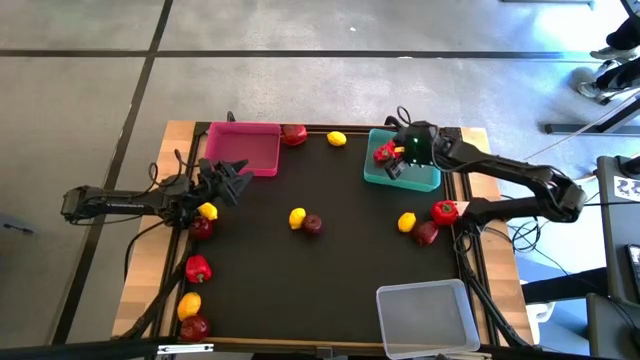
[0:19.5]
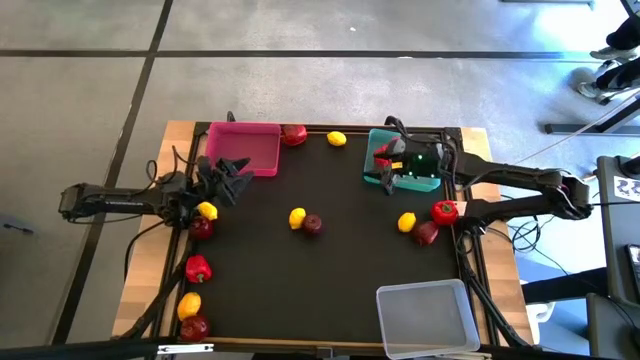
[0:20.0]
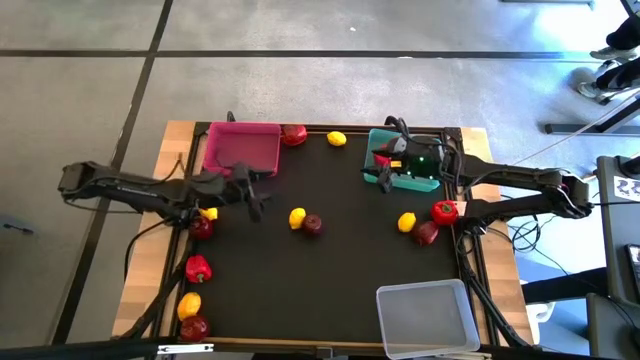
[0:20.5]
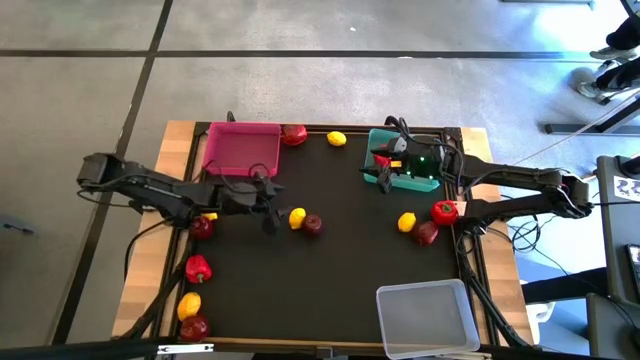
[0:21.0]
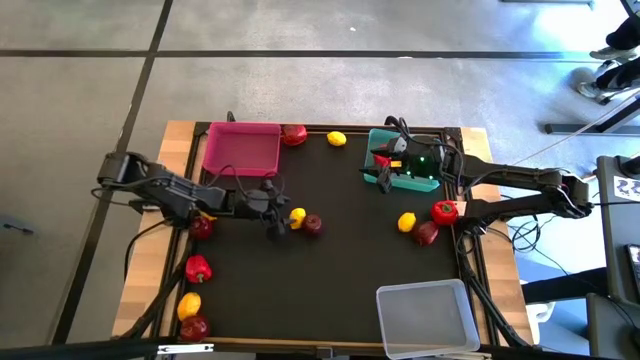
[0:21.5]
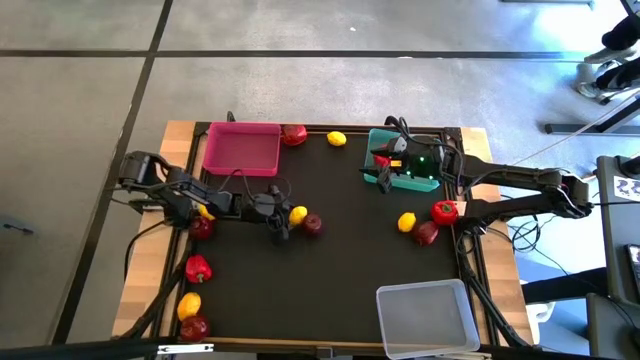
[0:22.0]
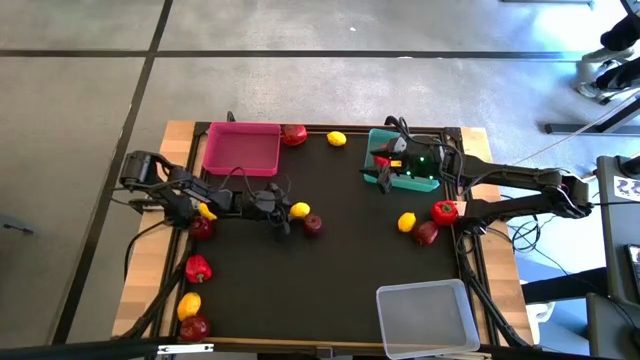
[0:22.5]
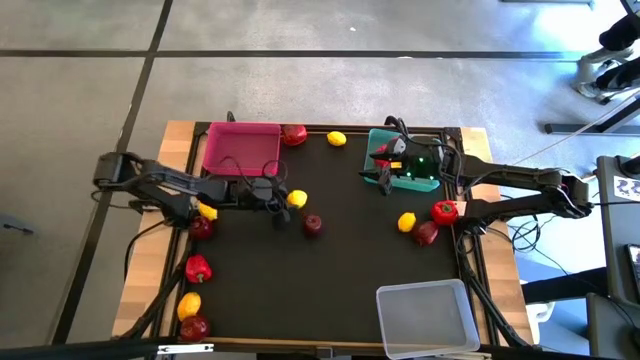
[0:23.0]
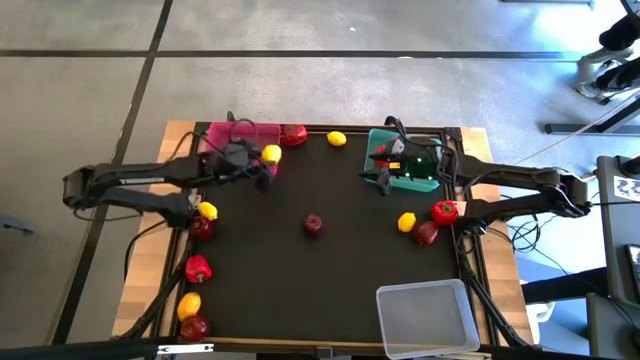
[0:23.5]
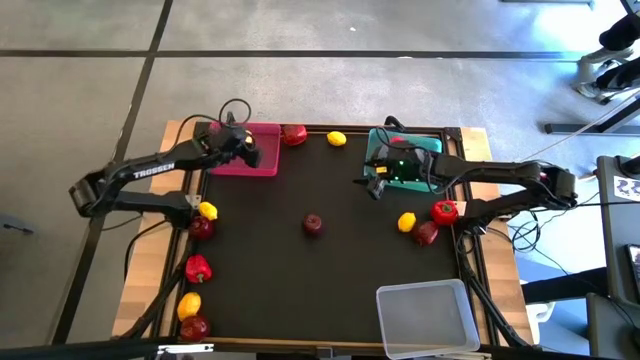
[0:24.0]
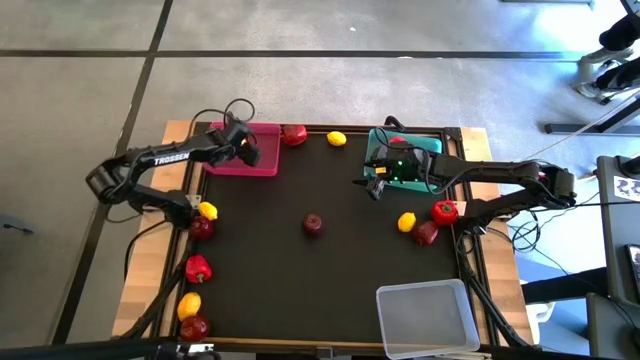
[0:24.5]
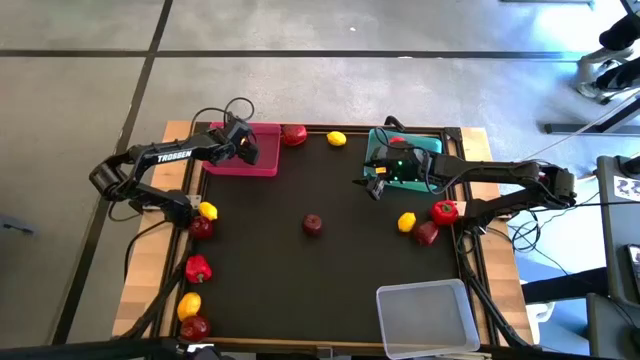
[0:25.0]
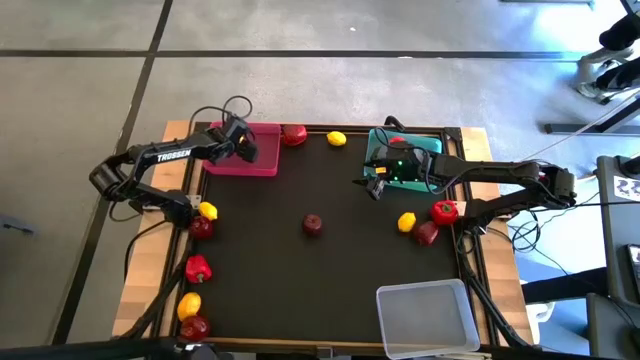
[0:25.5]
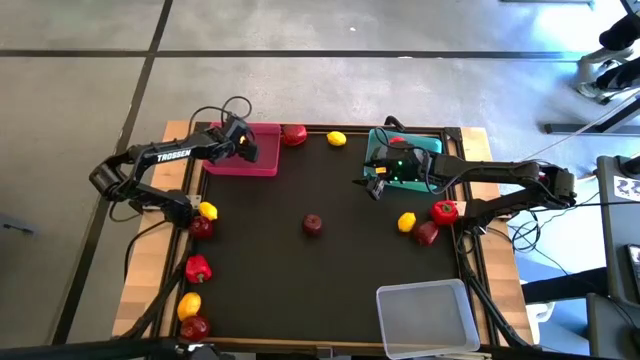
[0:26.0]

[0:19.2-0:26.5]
Task: Sort produce into baskets
Put the lemon into the pink bin

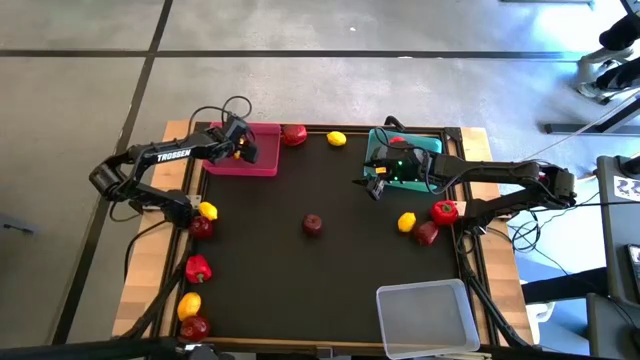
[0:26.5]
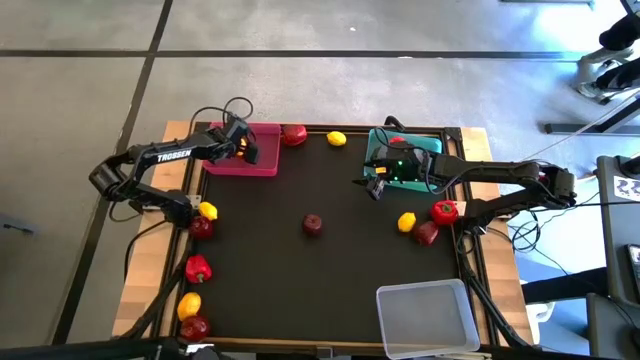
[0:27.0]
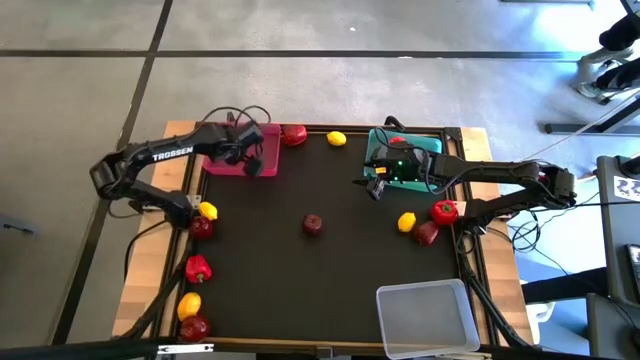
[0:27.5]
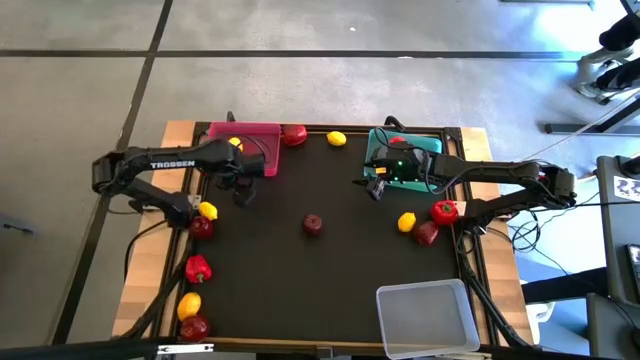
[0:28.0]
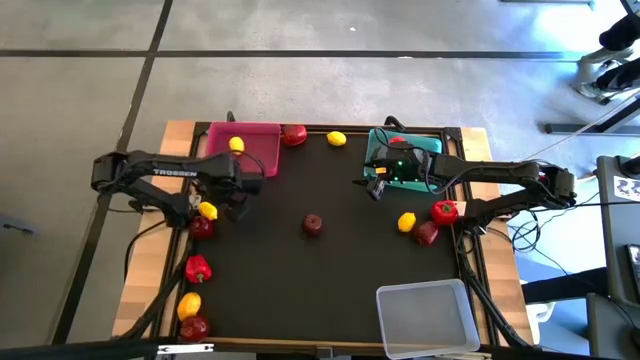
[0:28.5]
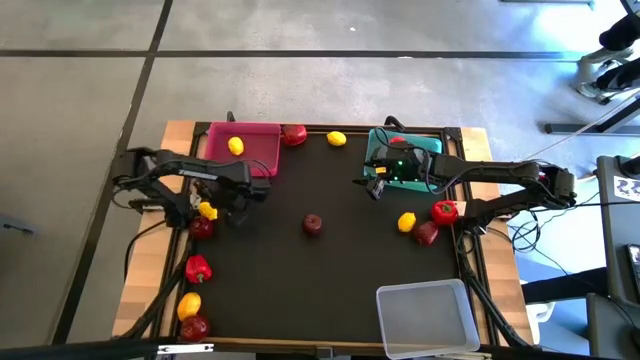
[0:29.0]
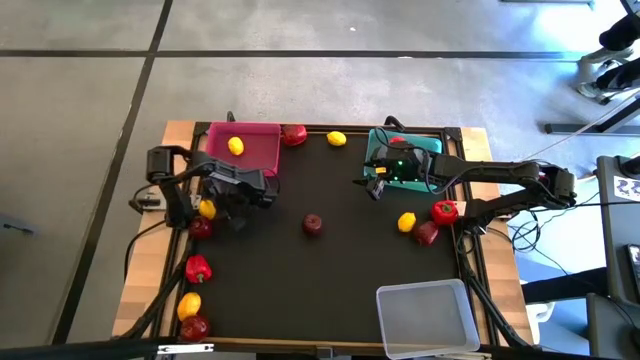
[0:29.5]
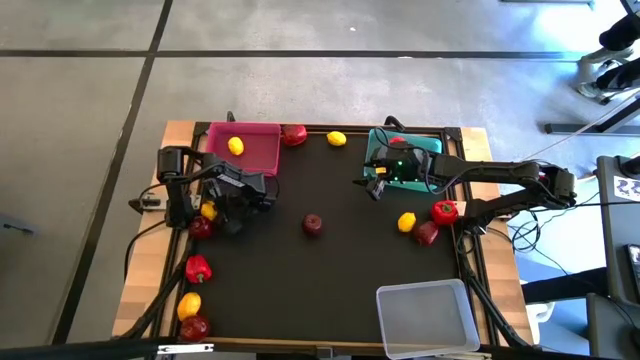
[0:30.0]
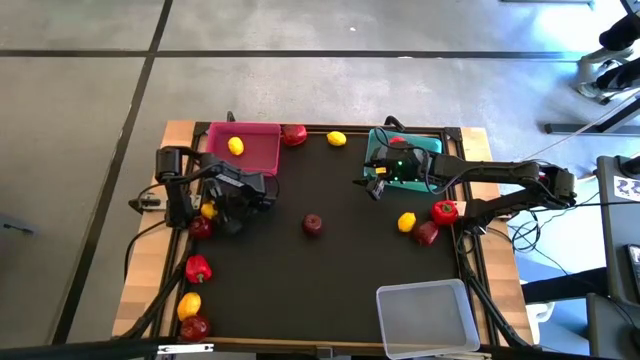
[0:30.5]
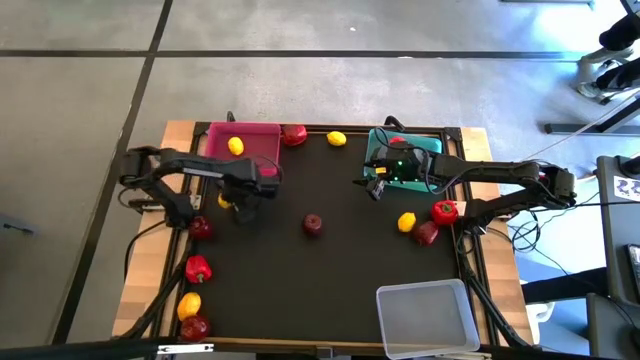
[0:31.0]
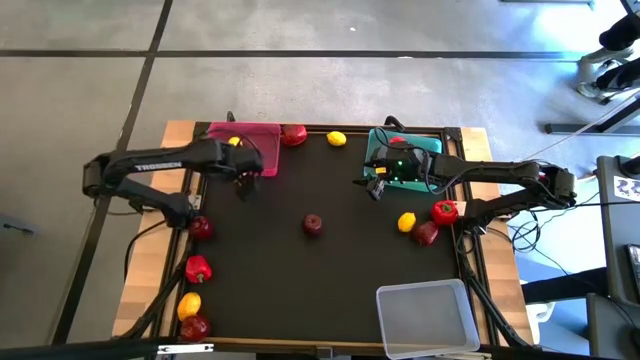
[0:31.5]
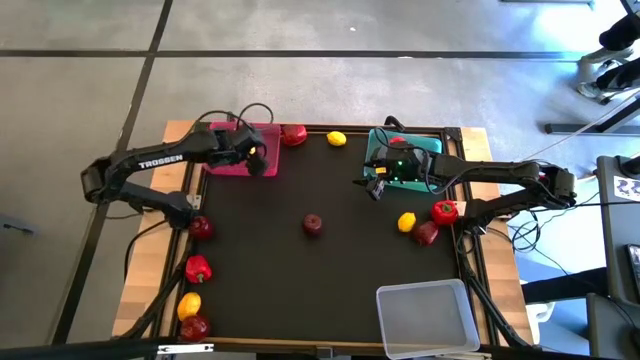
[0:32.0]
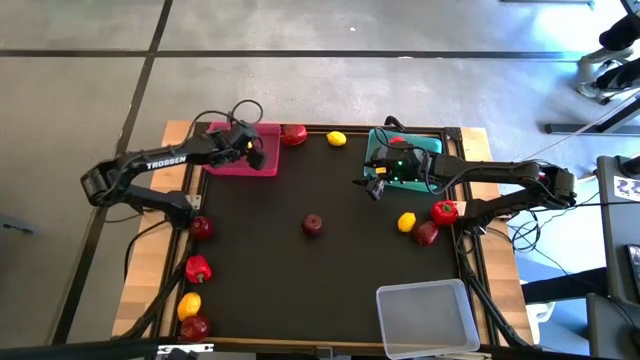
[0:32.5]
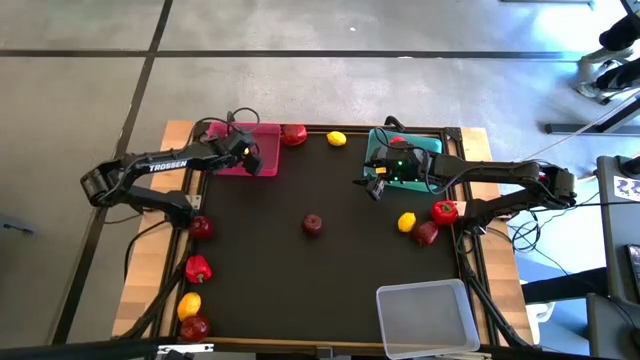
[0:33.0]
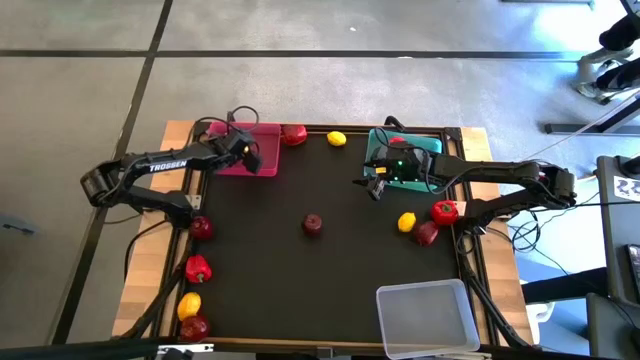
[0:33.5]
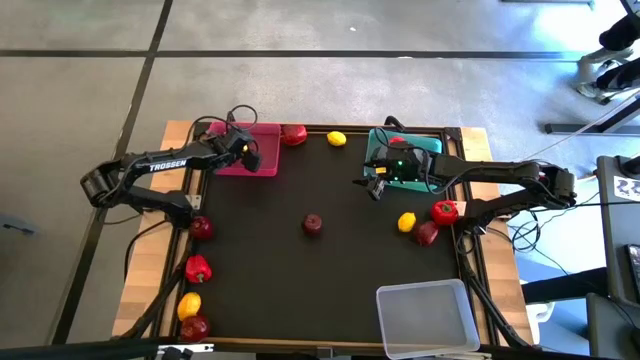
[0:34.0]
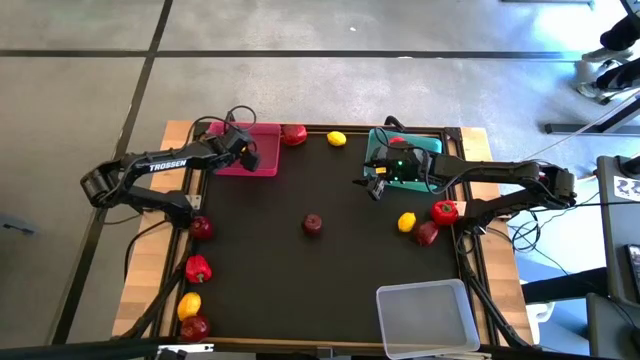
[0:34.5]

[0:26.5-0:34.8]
Put the lemon into the pink bin

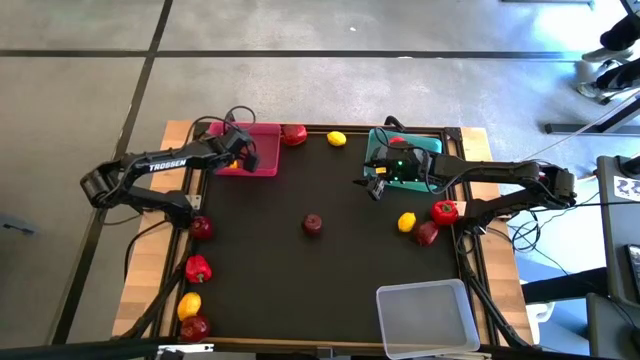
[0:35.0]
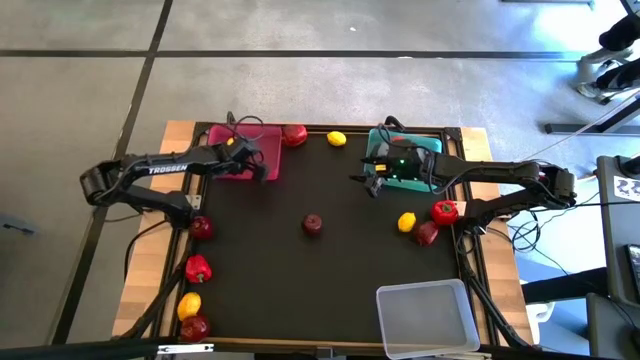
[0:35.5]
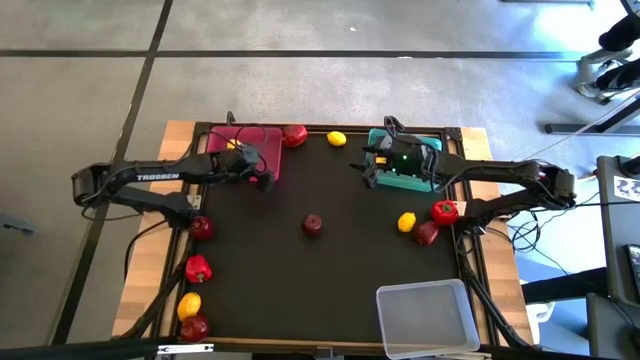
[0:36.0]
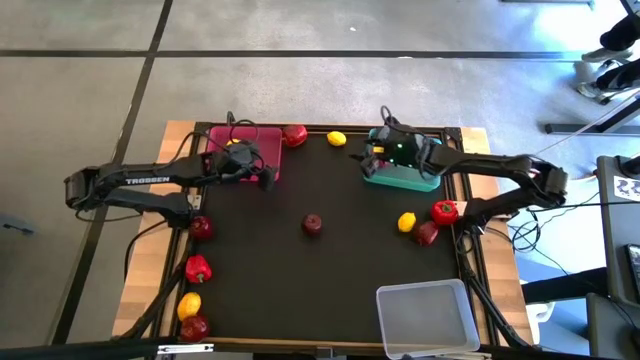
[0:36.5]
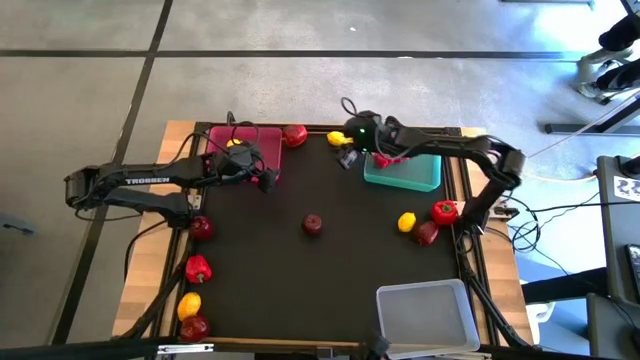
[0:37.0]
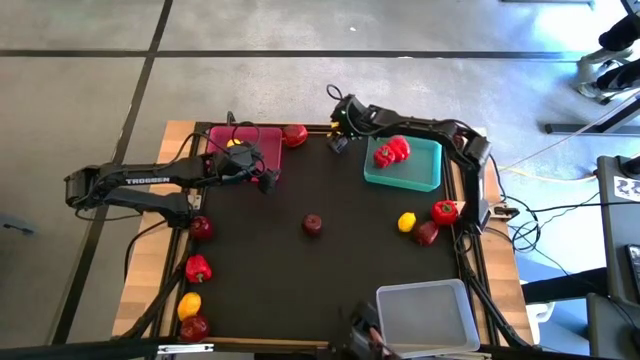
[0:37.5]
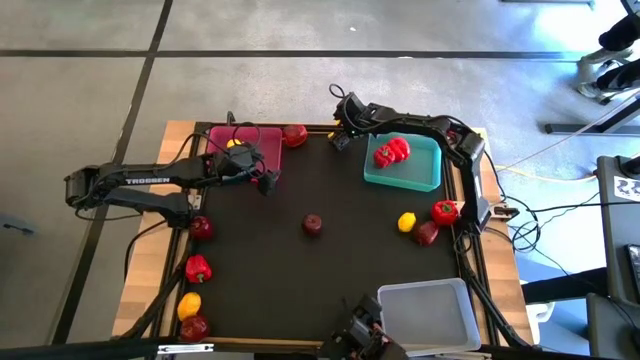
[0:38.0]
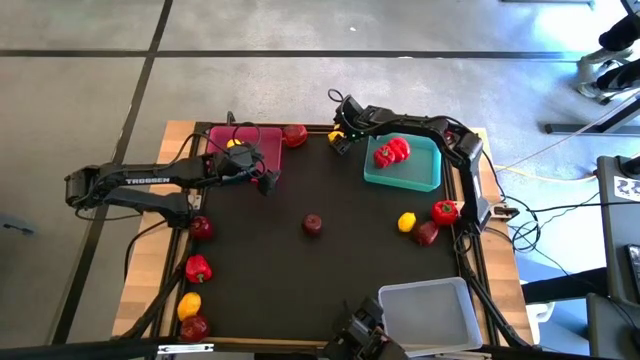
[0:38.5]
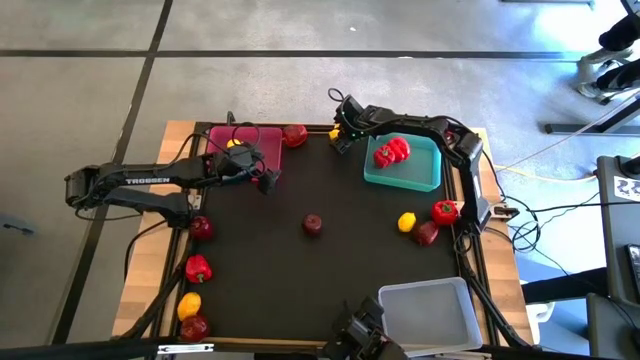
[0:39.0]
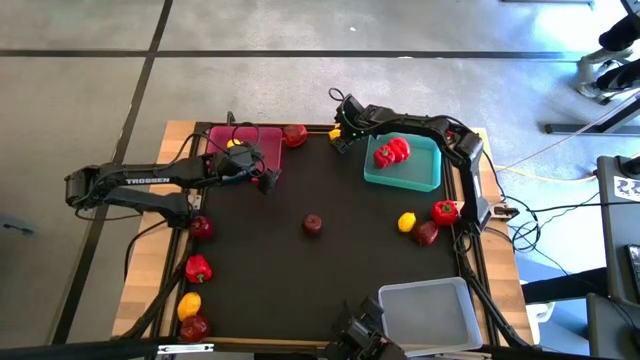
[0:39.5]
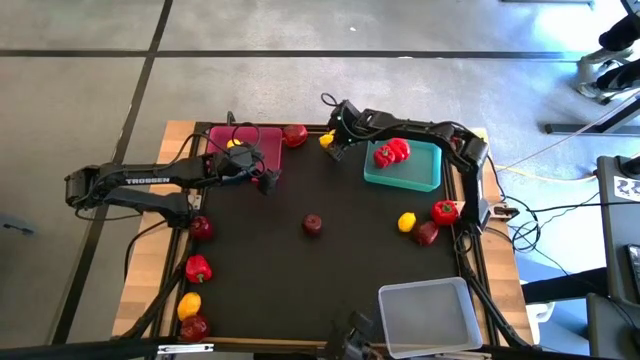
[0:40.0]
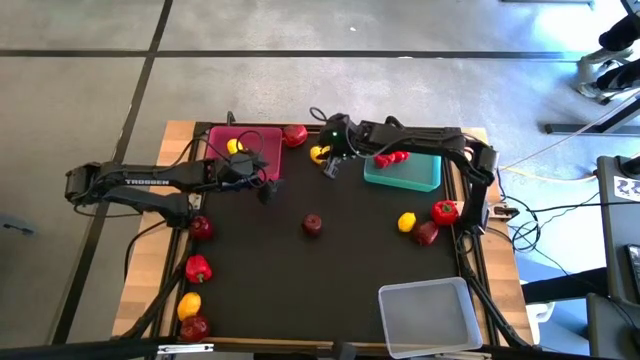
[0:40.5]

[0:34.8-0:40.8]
Put the lemon into the pink bin
